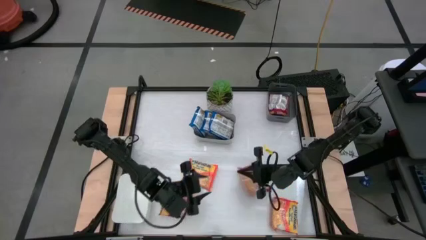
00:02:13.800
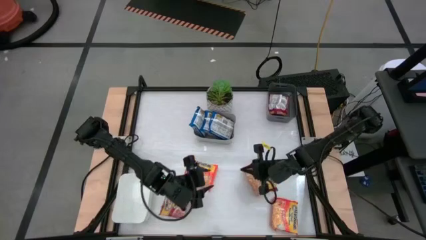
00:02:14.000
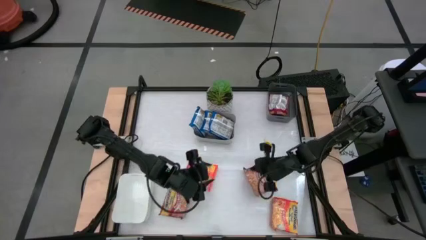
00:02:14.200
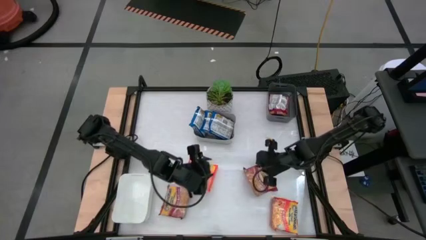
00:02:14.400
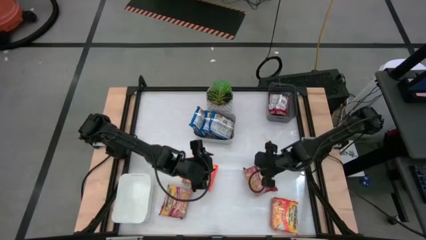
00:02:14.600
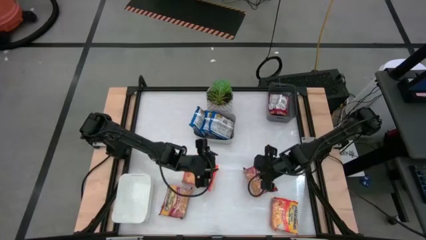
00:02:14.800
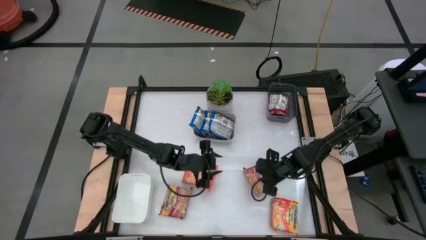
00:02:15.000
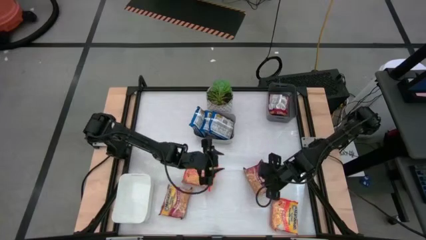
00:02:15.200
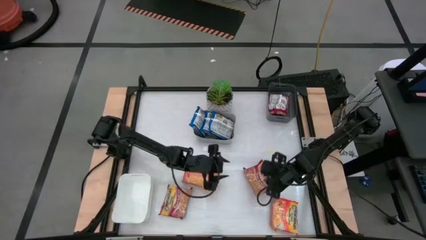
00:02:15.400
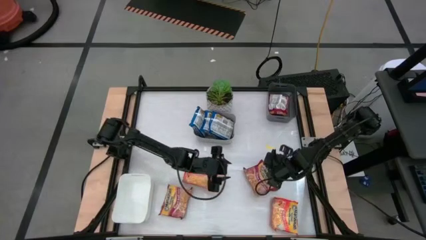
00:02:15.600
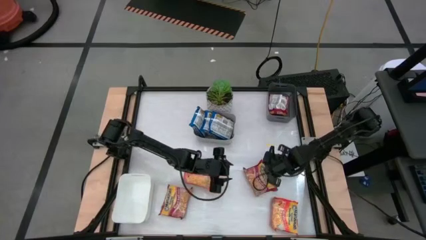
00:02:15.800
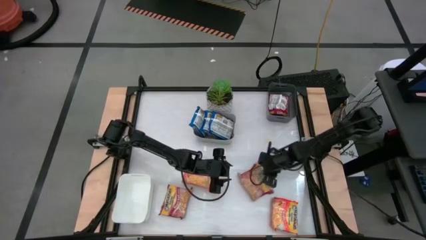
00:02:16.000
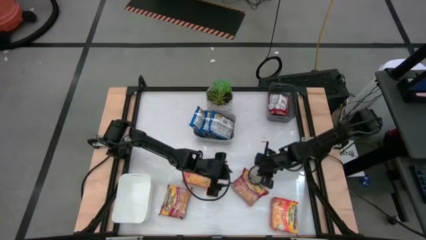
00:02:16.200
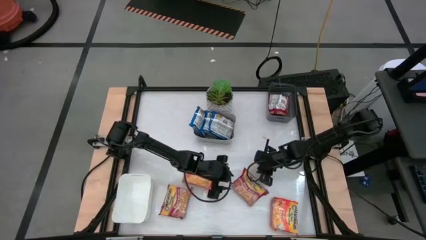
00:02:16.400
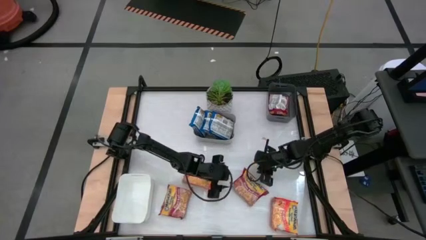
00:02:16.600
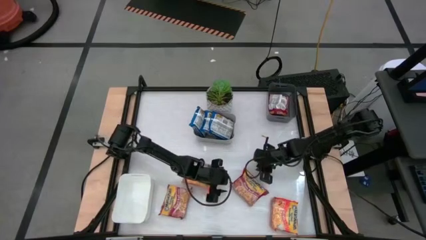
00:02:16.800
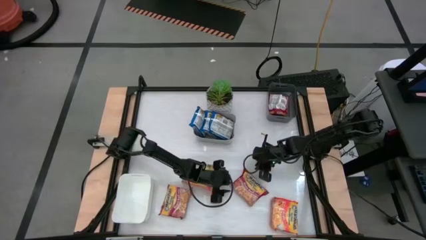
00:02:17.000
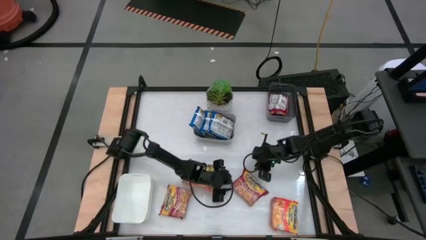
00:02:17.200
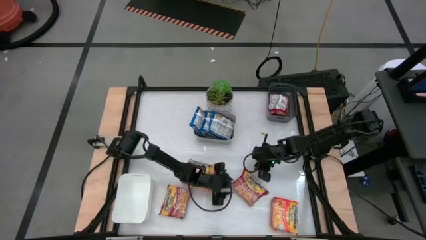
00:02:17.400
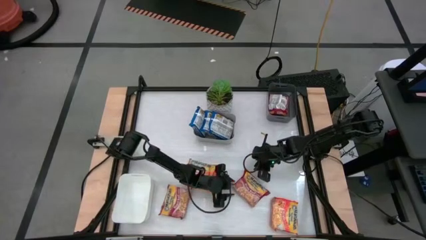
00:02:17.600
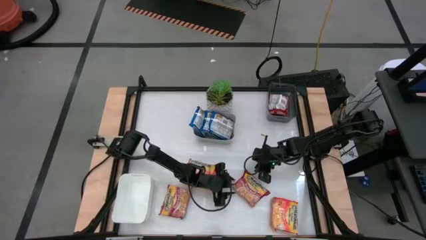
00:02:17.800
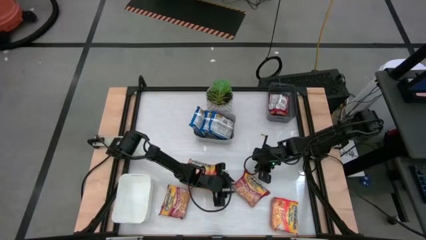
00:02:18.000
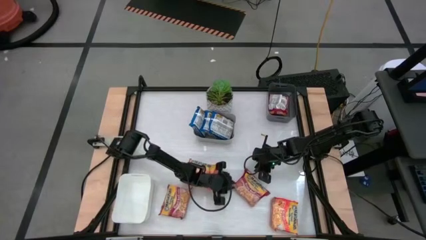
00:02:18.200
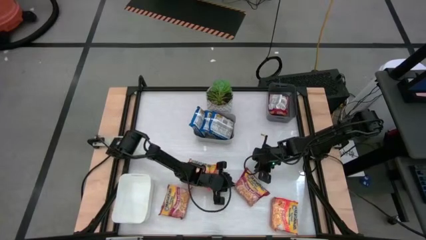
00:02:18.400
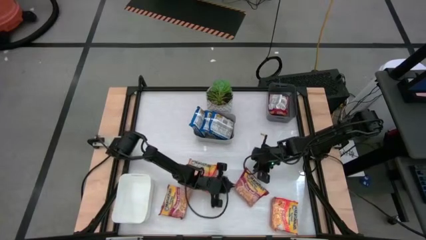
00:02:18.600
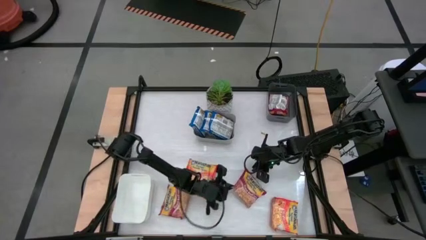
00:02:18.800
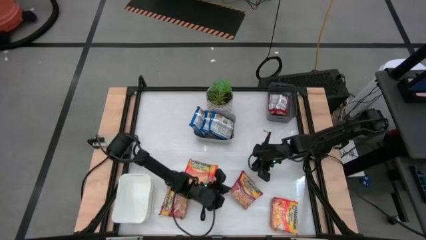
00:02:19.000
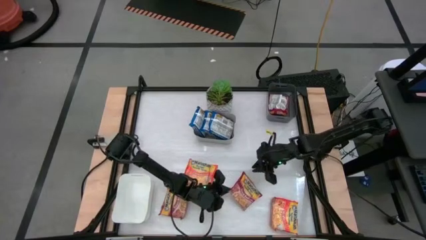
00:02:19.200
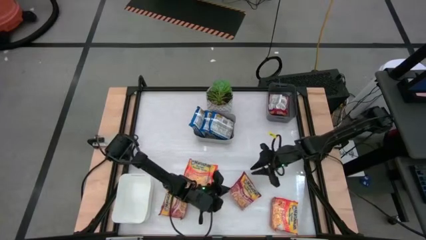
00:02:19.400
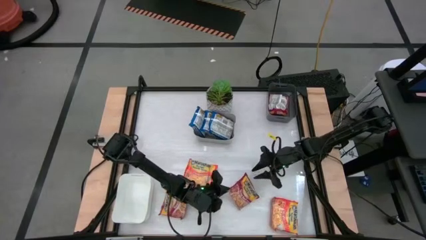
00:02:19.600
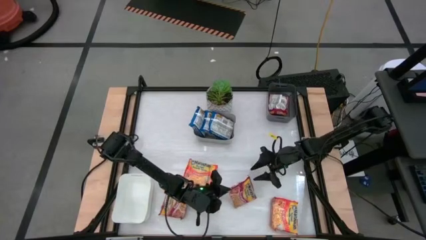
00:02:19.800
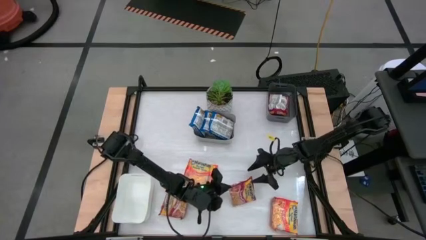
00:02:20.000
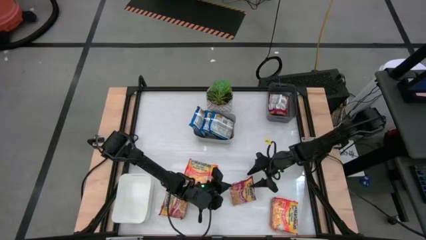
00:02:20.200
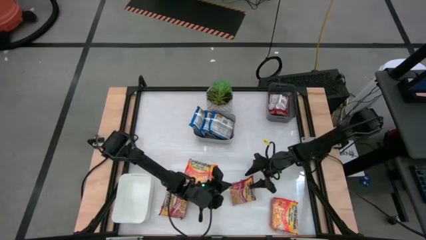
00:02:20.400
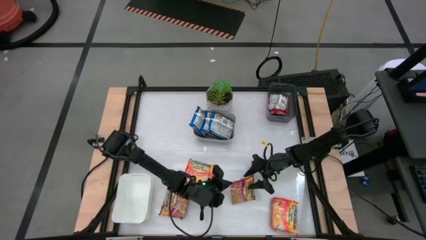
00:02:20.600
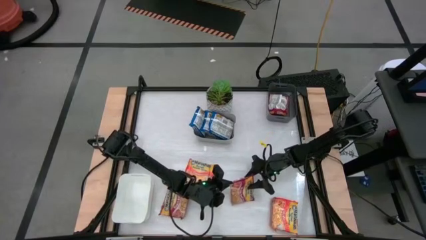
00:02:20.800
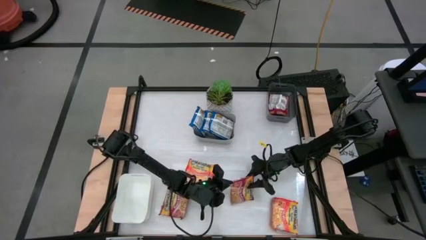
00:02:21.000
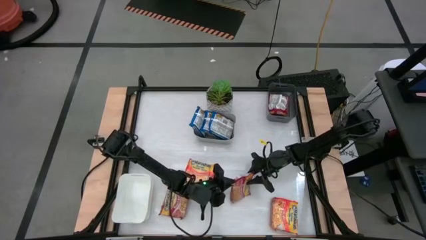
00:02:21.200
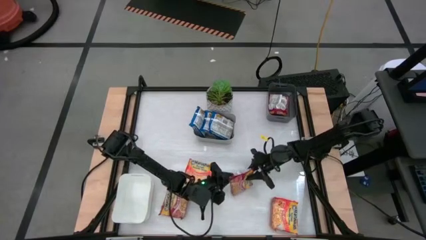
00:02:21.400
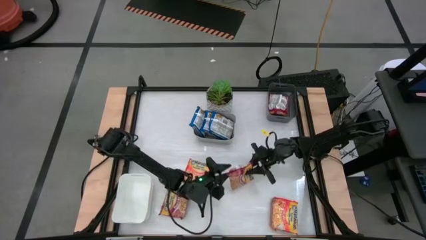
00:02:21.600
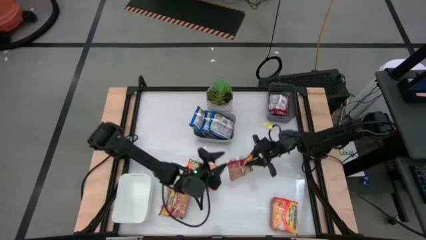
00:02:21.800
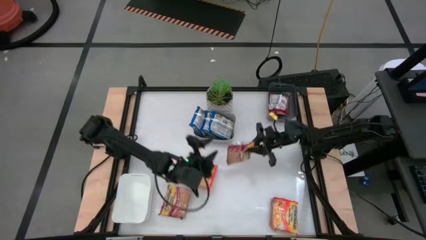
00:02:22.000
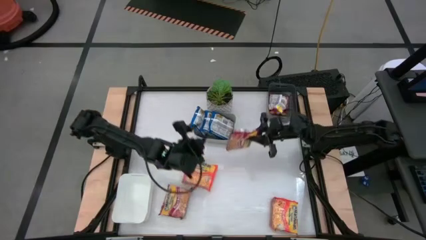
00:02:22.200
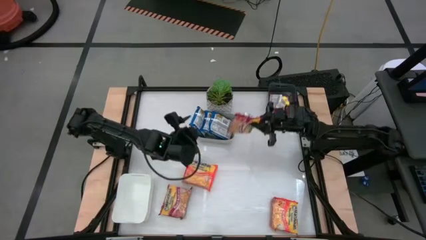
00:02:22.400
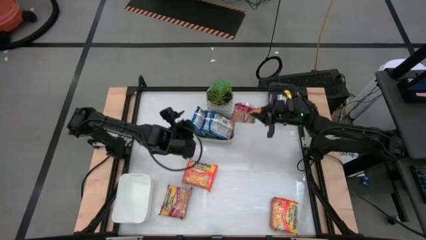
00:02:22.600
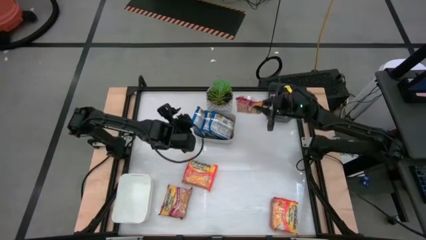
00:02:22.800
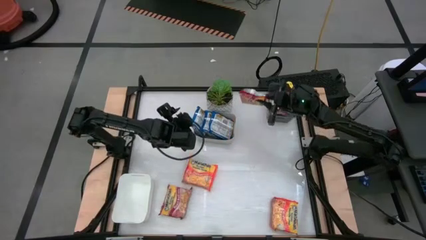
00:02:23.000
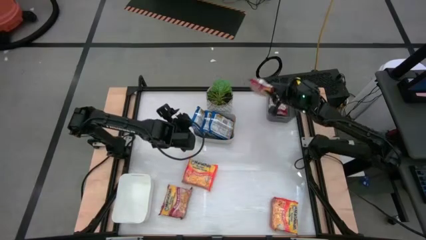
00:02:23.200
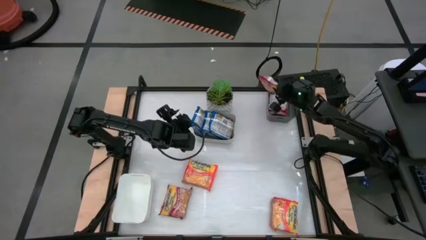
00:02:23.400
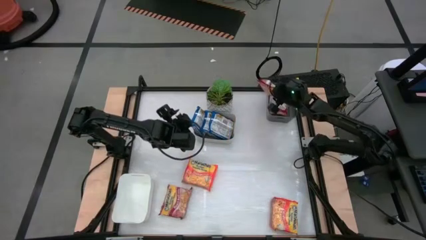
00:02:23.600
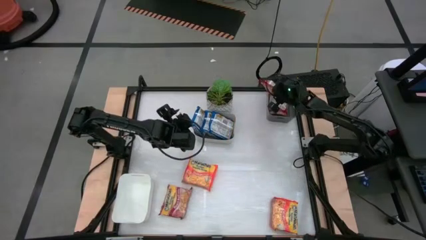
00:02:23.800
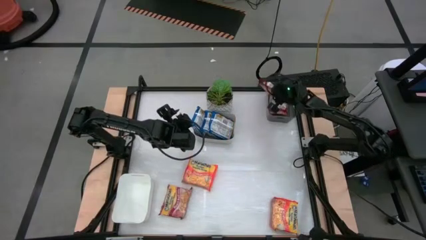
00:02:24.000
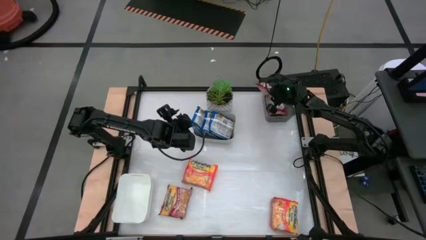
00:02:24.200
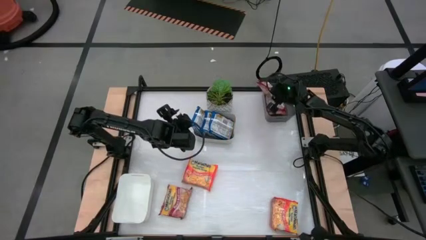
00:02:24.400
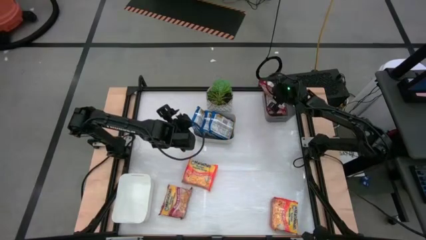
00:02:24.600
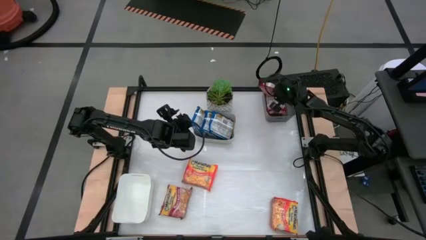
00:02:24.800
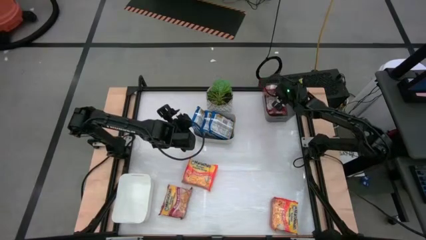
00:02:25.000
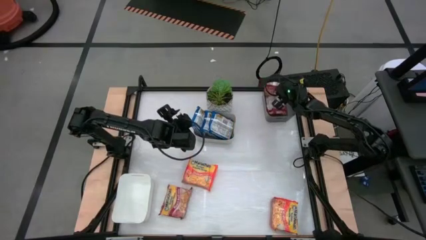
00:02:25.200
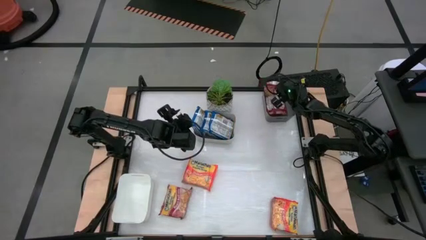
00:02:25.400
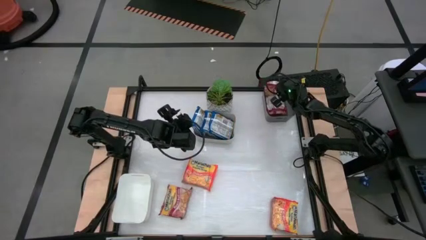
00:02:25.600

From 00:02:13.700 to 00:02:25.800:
Task: Sort Maruchan noodles
Put the right red noodle pack into the black bin

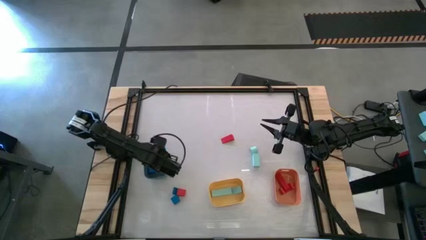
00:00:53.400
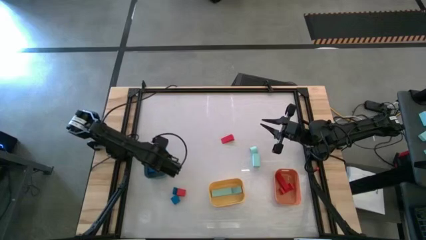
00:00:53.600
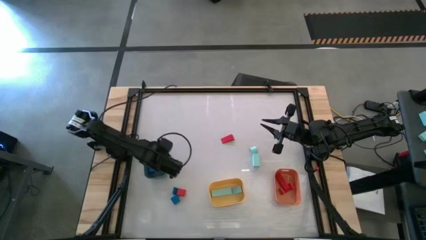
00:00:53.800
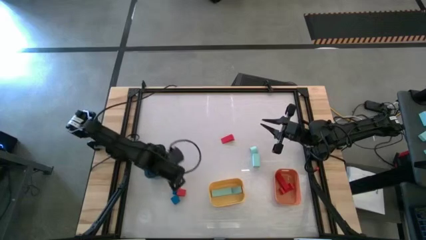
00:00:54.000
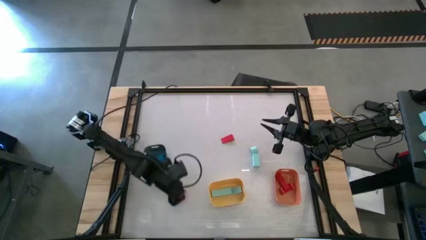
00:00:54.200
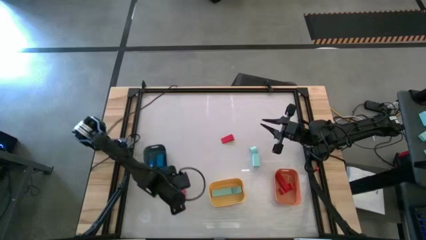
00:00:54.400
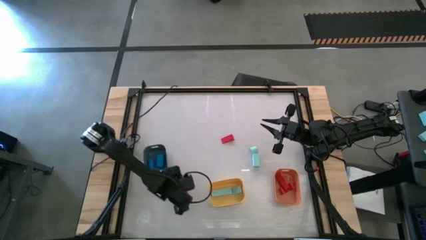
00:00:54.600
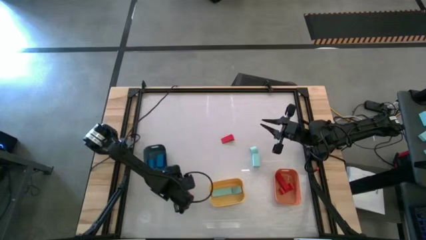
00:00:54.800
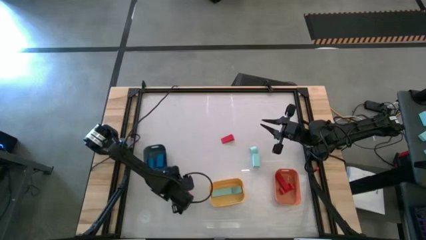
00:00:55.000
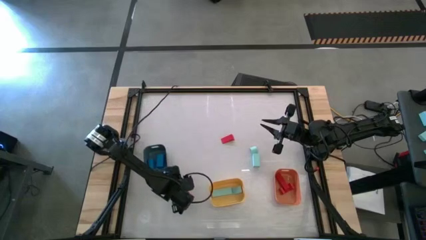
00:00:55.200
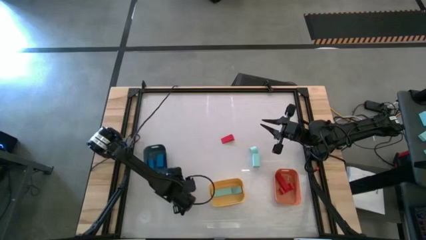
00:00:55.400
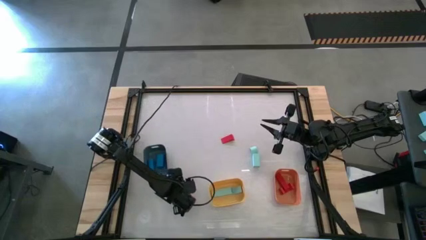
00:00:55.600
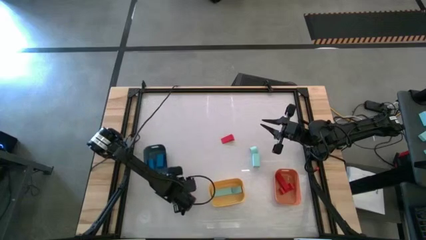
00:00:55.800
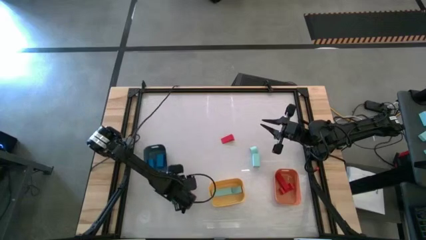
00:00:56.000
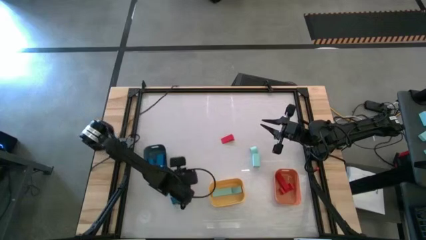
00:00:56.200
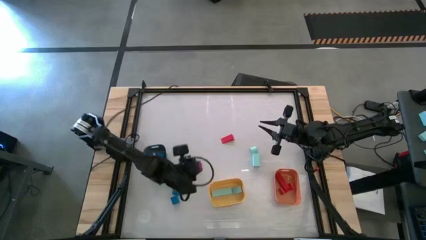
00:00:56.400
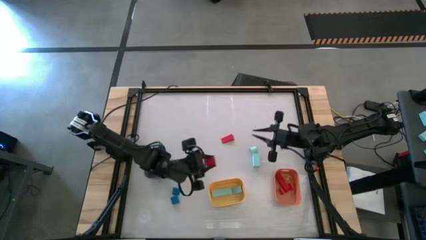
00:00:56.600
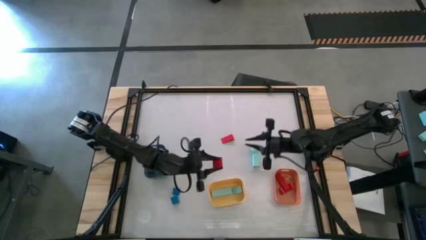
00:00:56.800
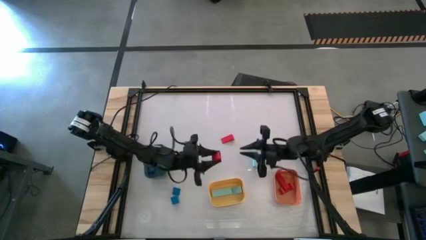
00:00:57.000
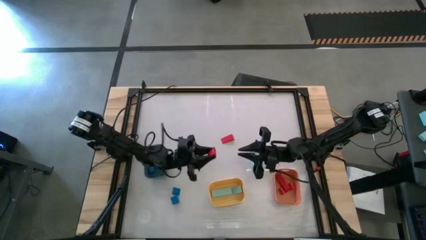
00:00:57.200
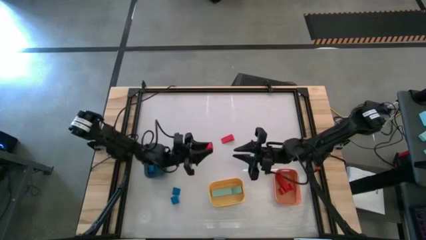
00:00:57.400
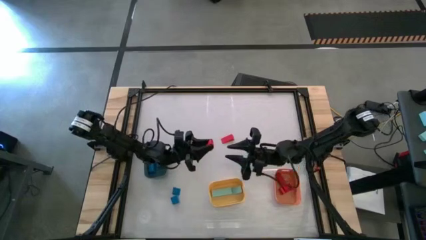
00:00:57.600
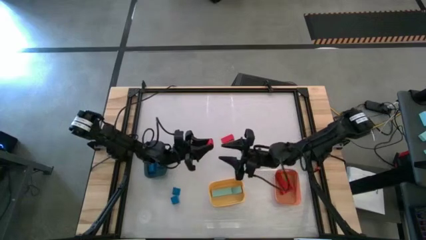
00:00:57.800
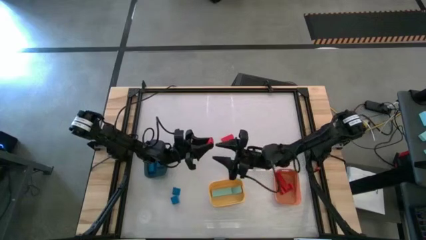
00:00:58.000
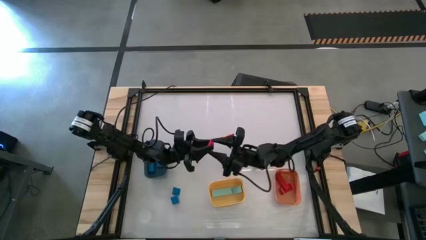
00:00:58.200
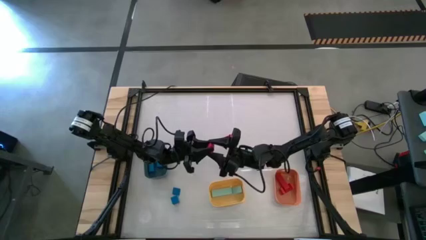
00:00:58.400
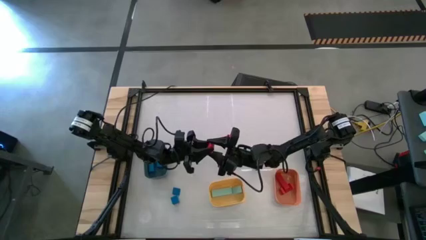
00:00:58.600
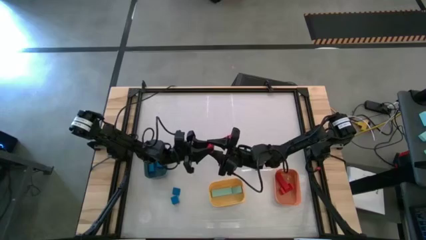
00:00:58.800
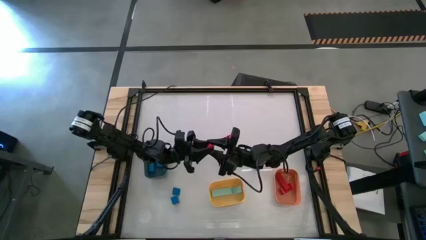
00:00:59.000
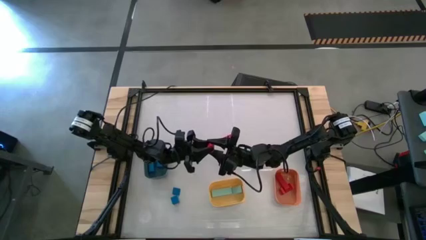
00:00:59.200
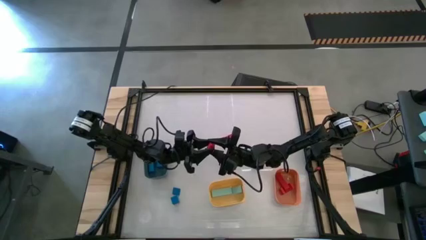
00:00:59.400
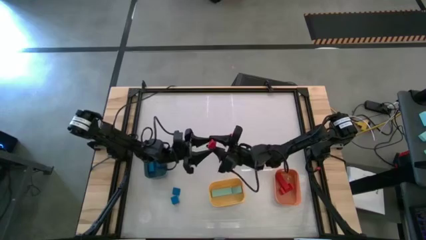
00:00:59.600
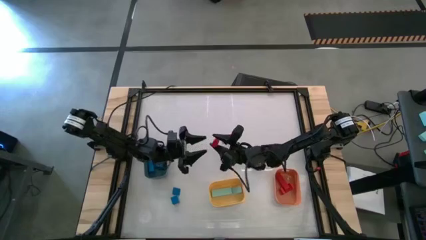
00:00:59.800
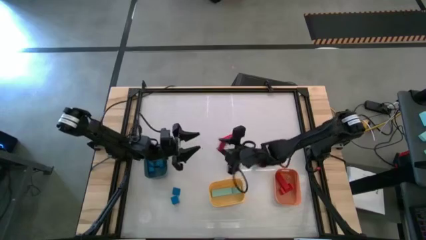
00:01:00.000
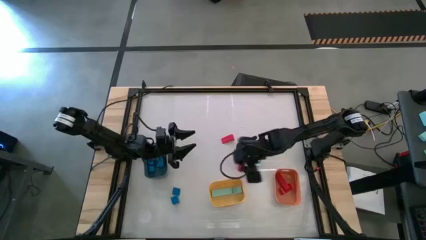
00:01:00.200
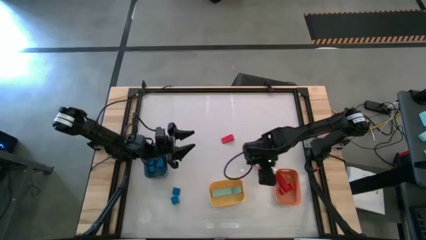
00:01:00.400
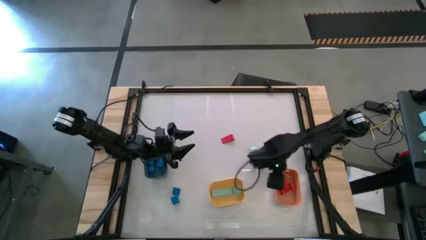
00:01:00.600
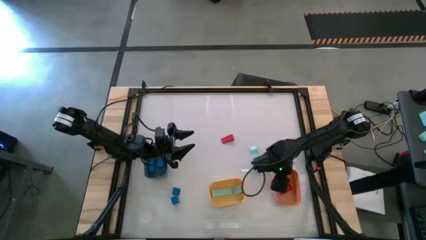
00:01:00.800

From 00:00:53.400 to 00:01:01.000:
Task: Sort & place blocks by color
Put the red block into the orange bin
